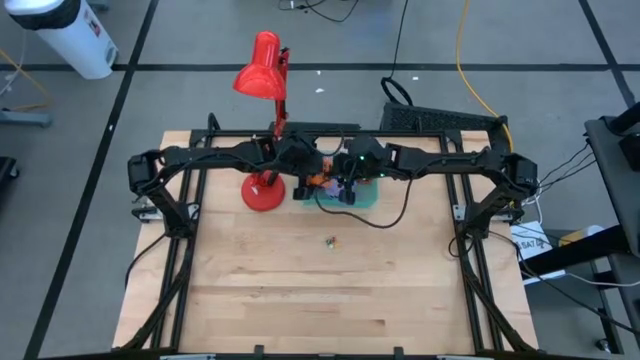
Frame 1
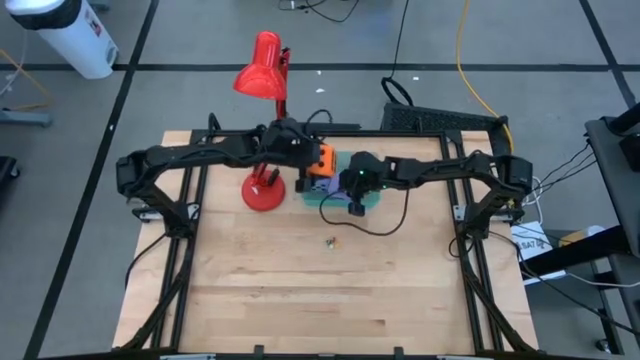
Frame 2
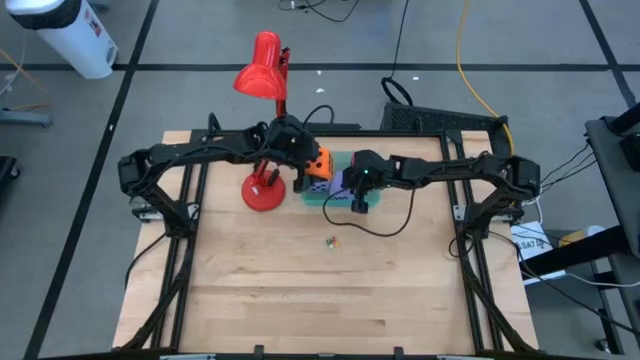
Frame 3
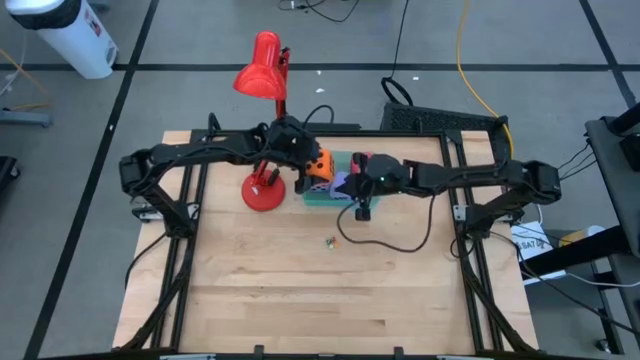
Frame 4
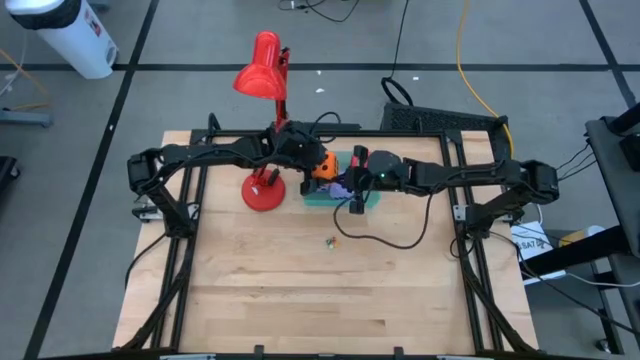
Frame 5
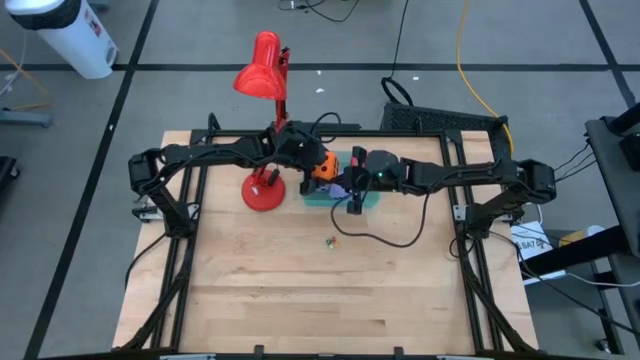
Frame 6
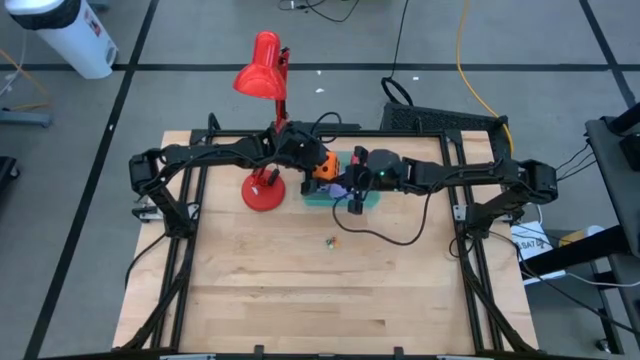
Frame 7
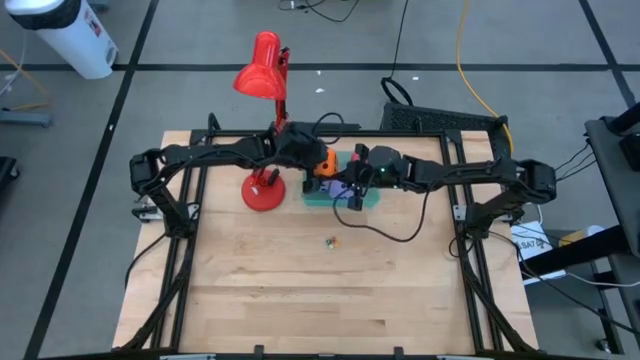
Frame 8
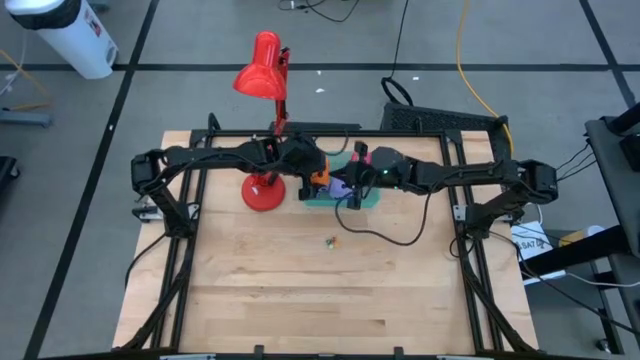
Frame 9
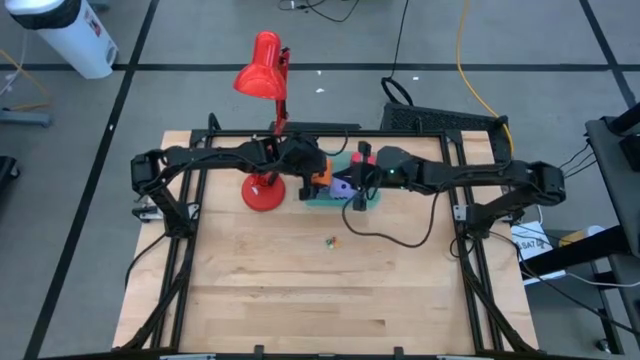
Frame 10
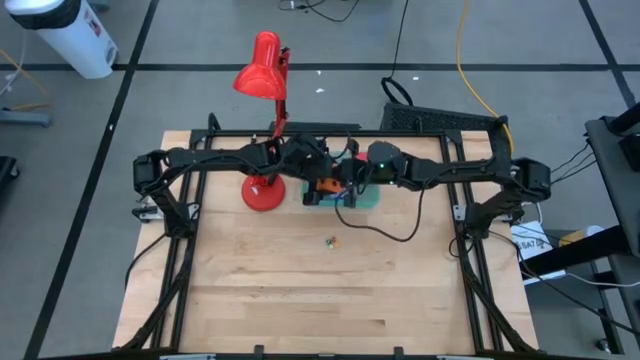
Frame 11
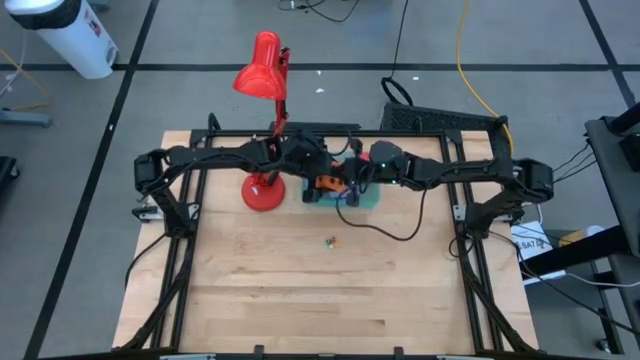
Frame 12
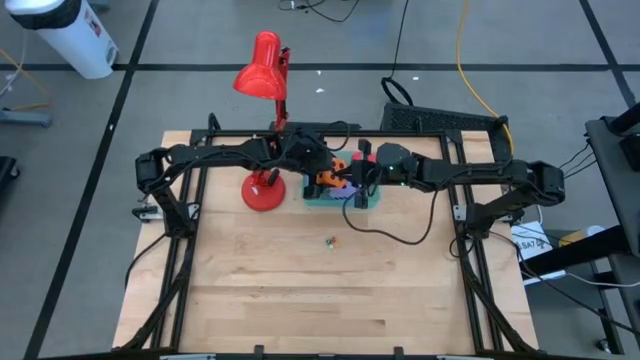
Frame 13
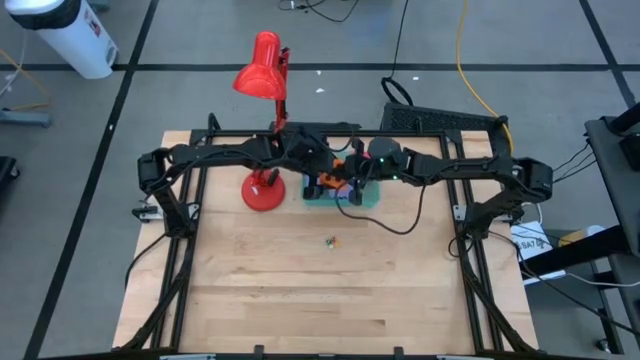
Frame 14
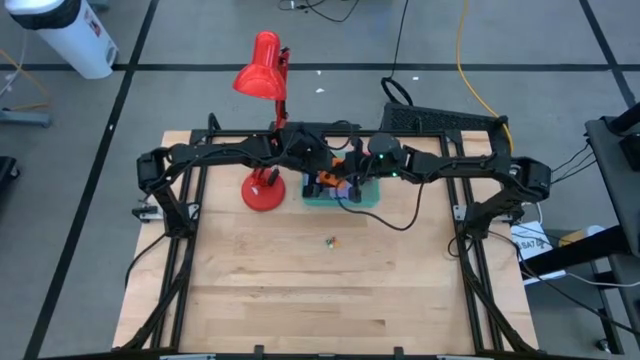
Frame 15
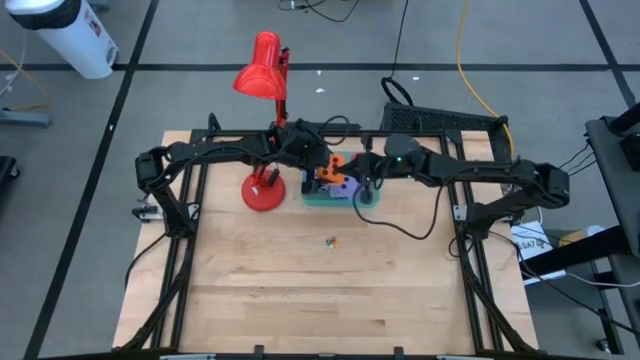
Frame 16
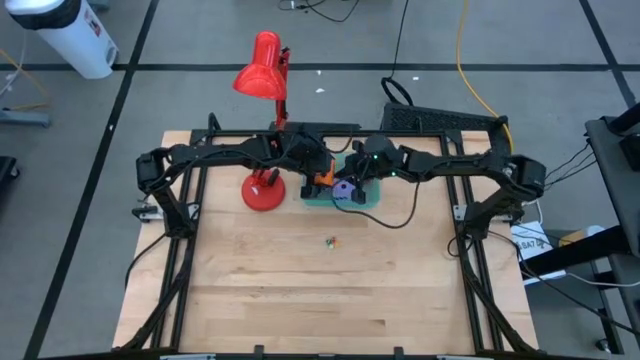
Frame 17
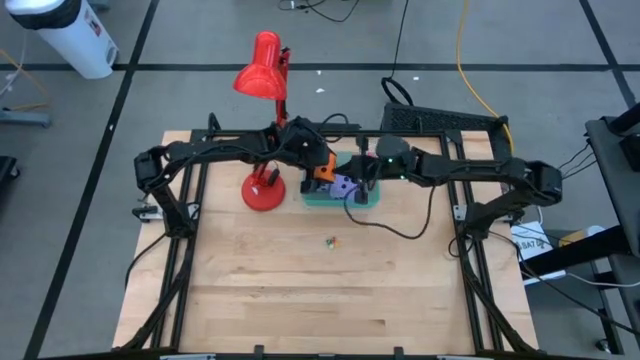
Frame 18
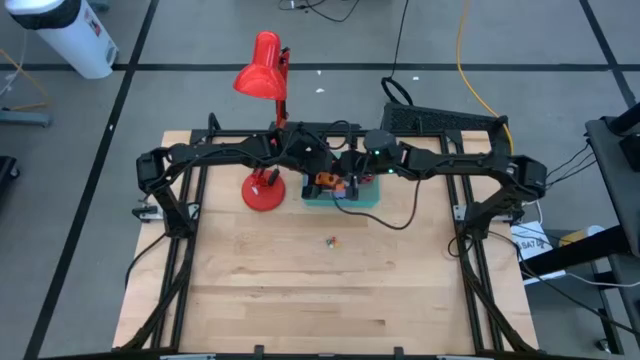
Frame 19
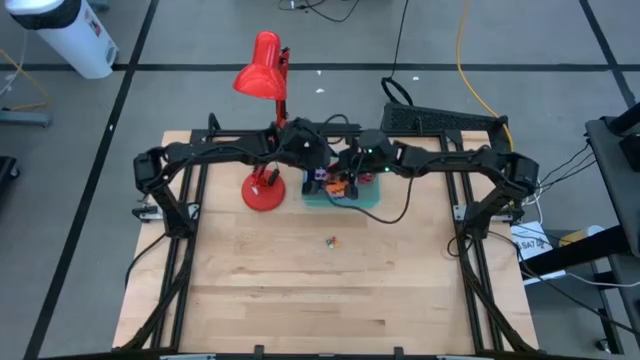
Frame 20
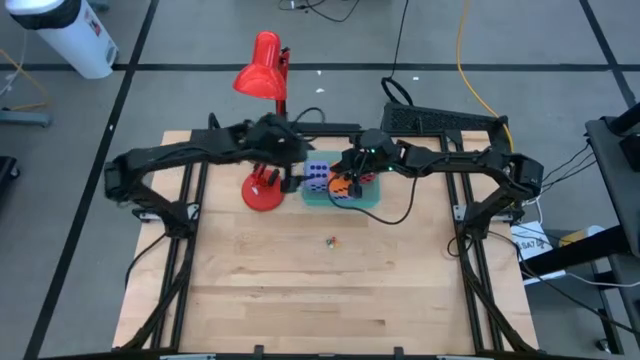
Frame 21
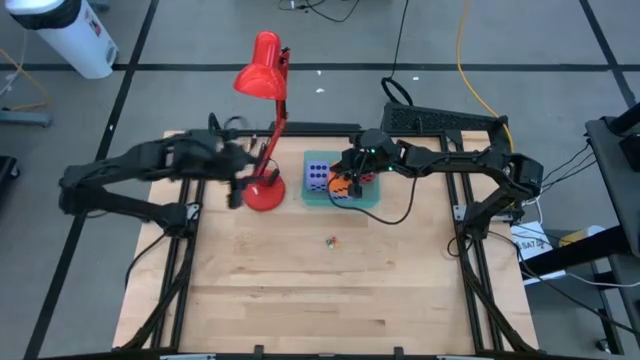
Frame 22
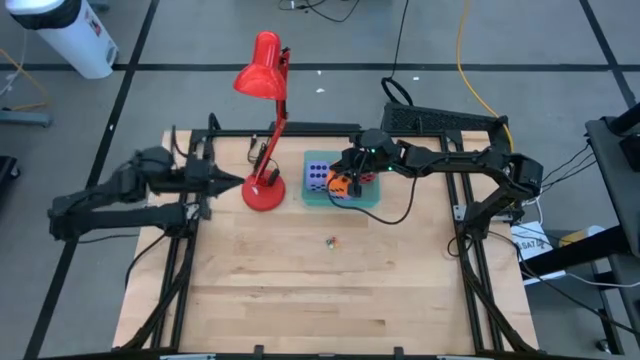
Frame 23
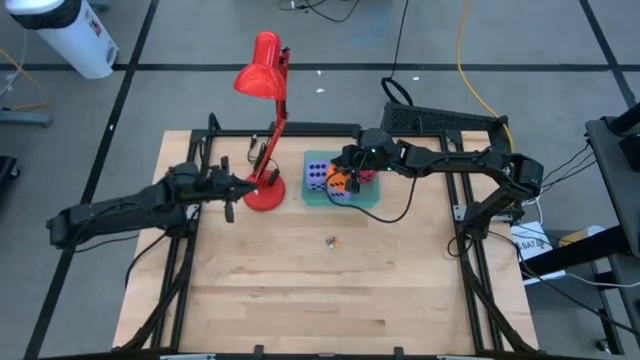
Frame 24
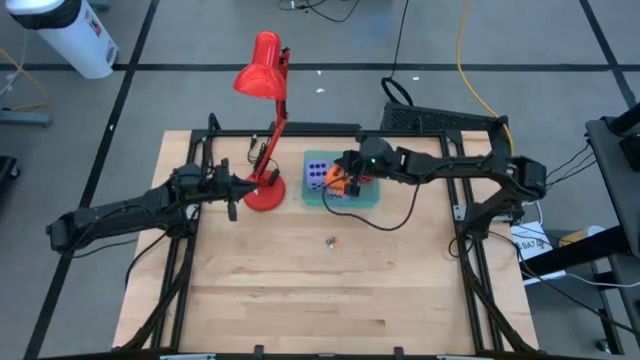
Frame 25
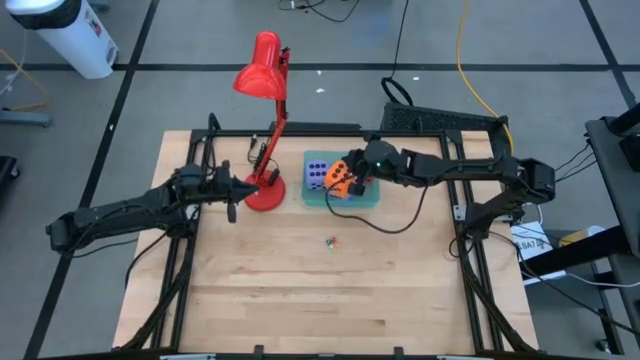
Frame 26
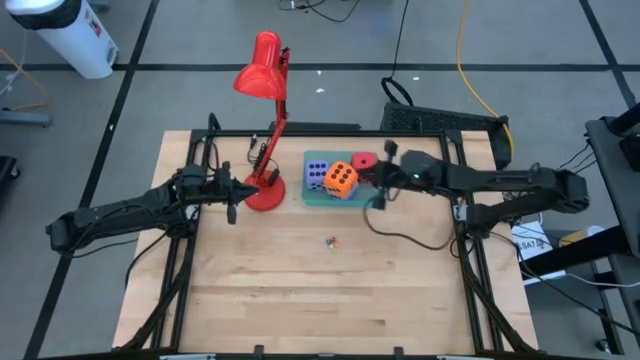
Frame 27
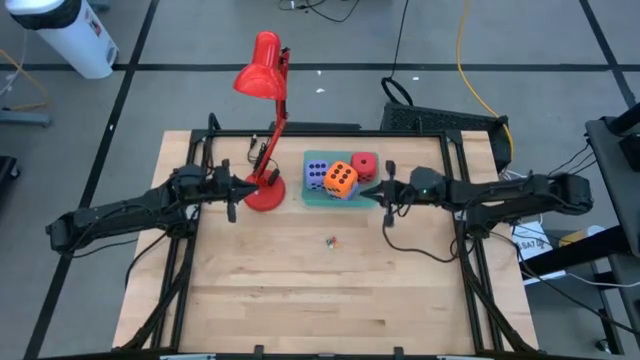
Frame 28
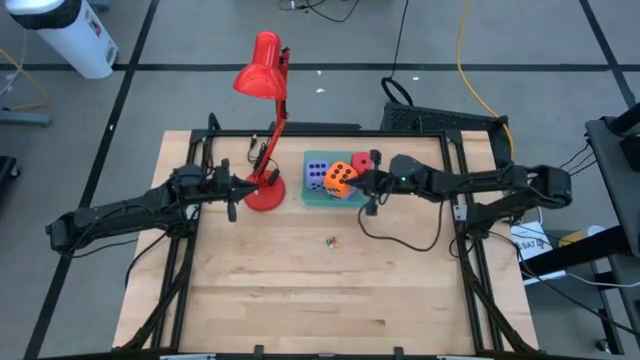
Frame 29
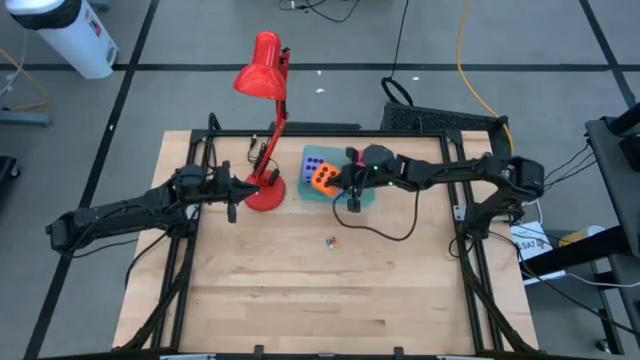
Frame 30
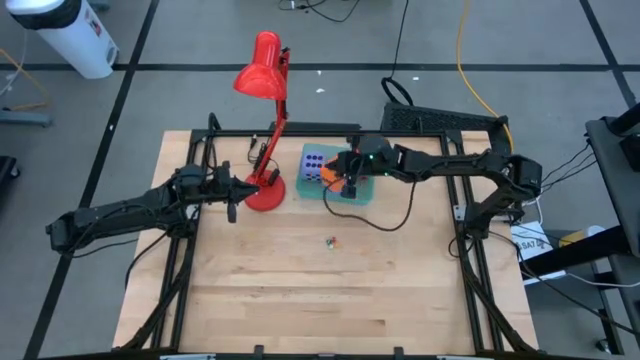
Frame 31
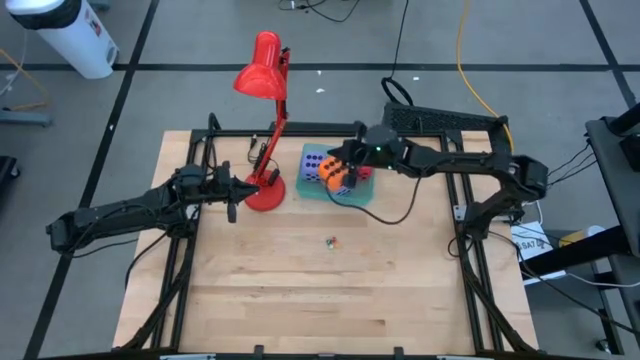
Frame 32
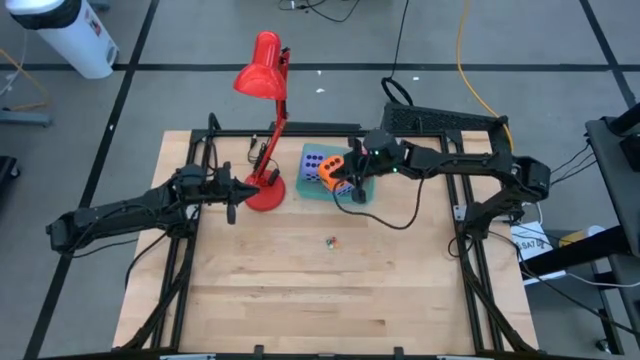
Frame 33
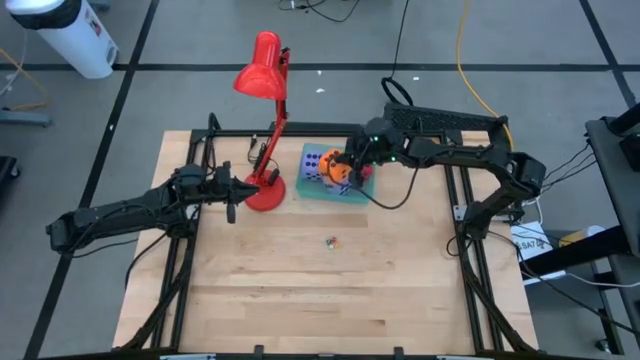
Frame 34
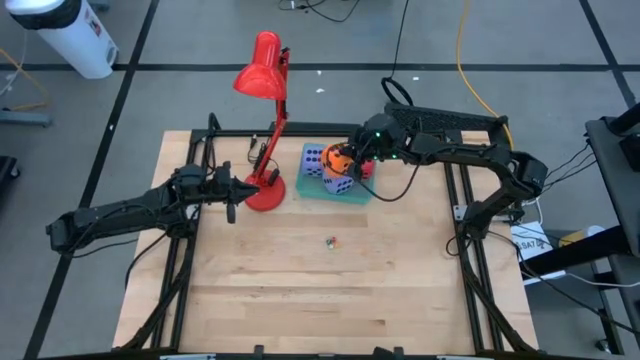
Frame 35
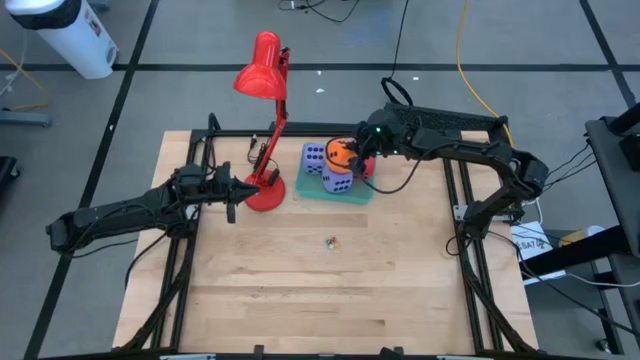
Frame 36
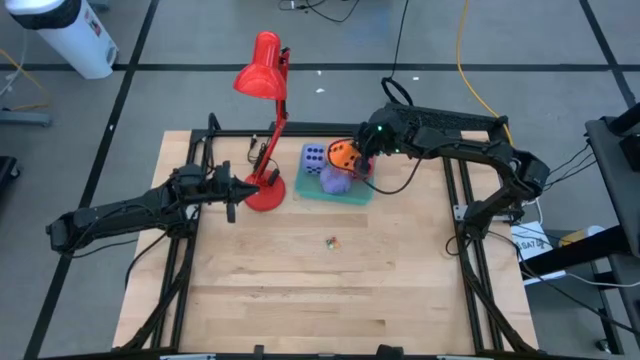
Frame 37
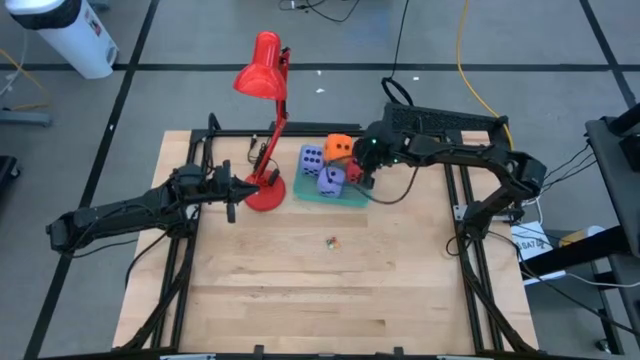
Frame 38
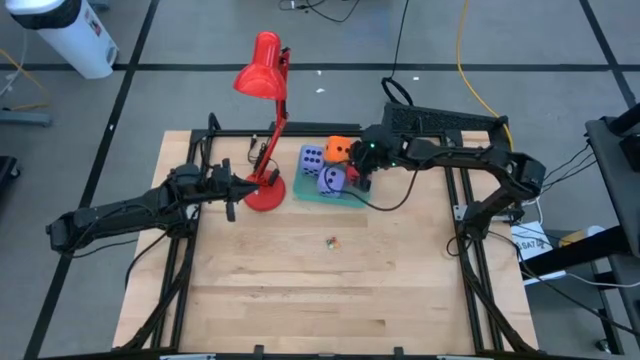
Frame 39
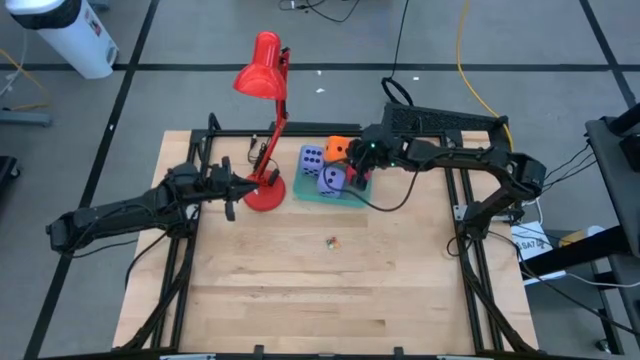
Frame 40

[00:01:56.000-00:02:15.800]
Task: Pick & Place Dice
Put the large orange die into the blue bin
